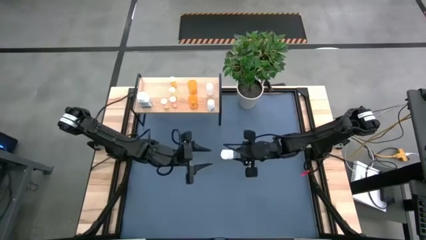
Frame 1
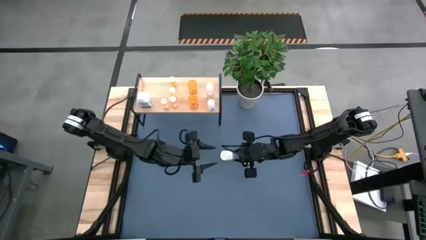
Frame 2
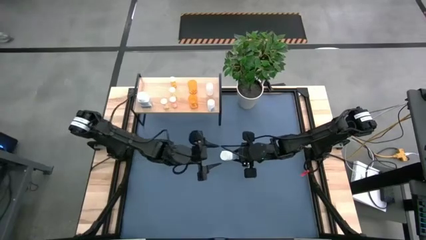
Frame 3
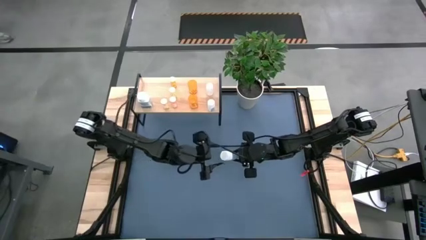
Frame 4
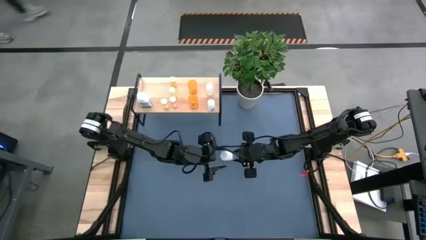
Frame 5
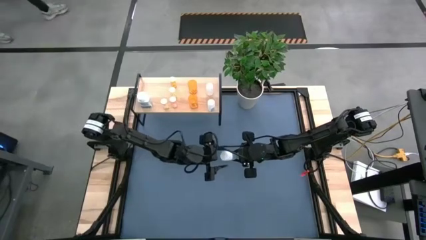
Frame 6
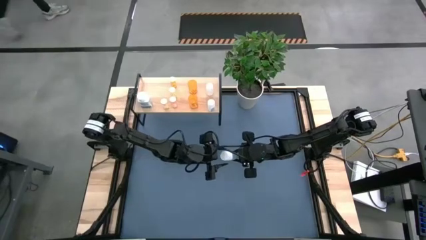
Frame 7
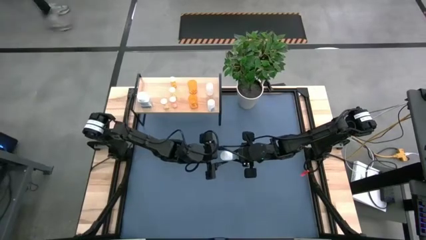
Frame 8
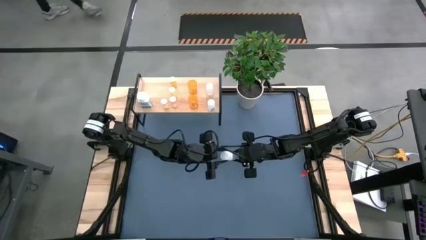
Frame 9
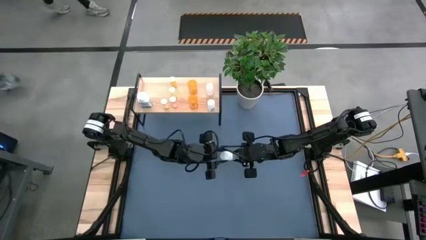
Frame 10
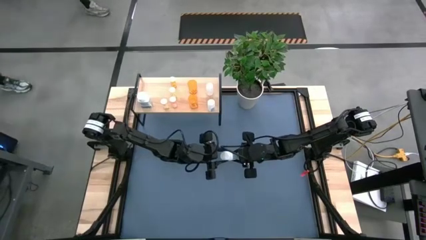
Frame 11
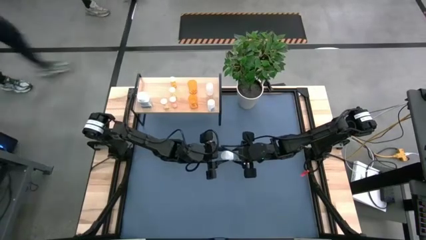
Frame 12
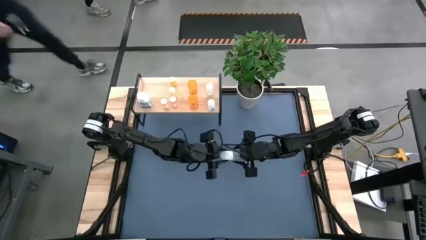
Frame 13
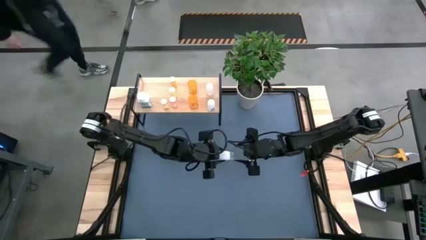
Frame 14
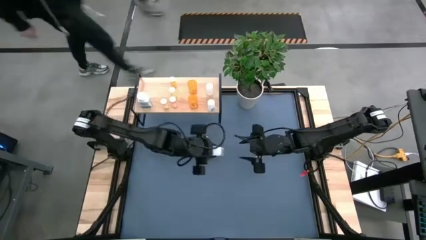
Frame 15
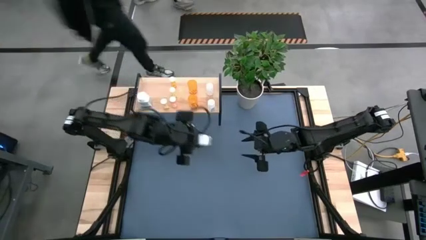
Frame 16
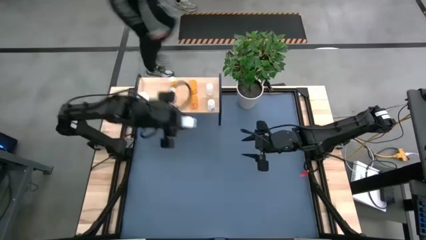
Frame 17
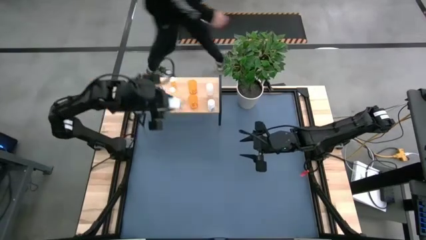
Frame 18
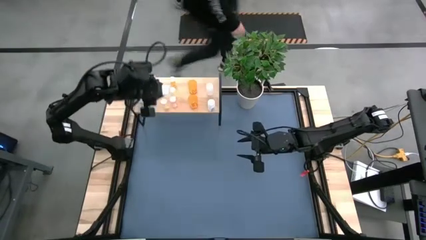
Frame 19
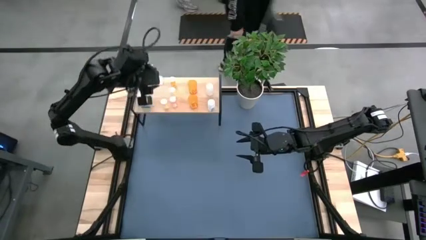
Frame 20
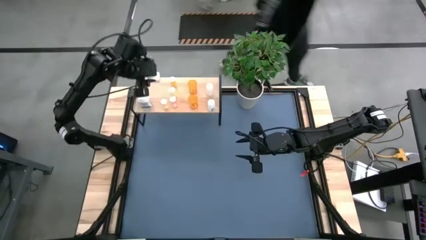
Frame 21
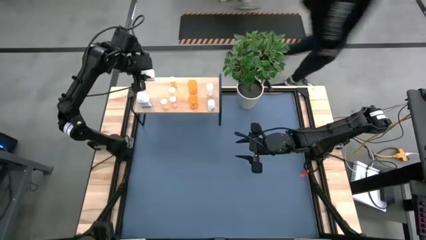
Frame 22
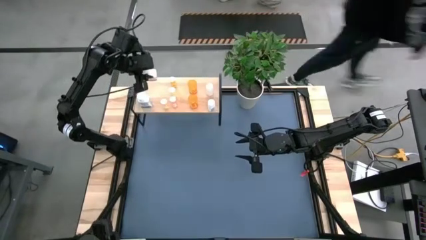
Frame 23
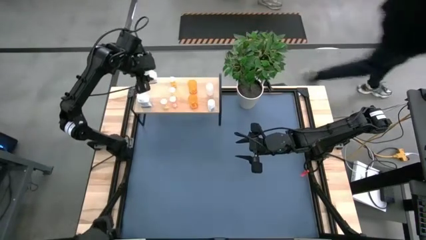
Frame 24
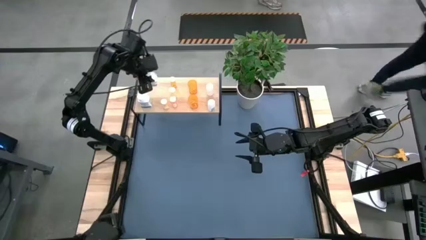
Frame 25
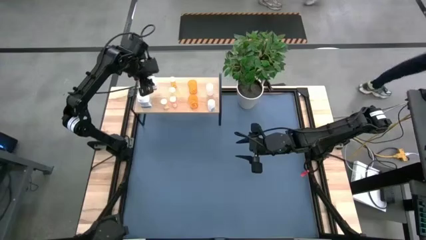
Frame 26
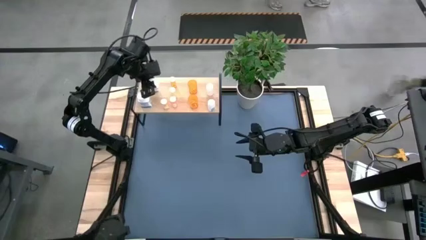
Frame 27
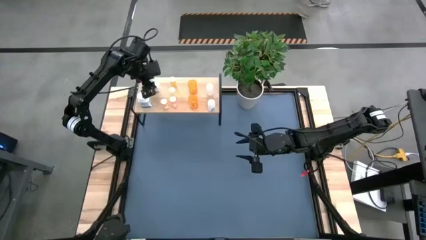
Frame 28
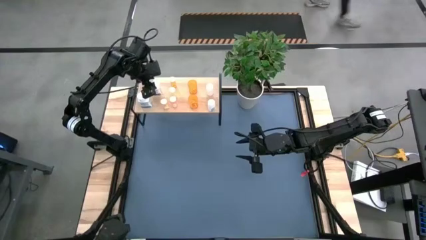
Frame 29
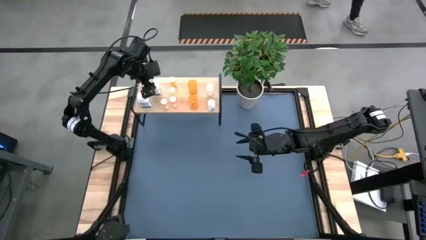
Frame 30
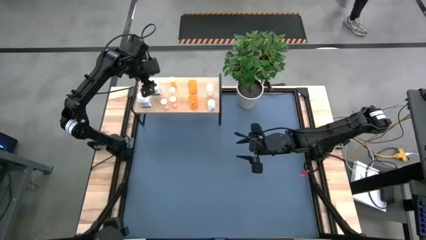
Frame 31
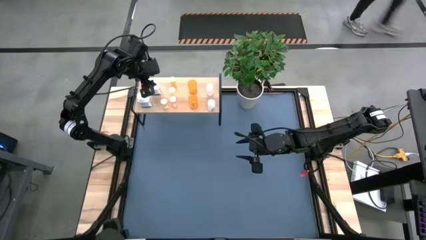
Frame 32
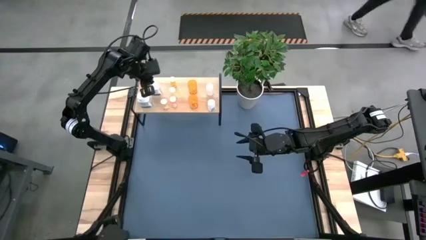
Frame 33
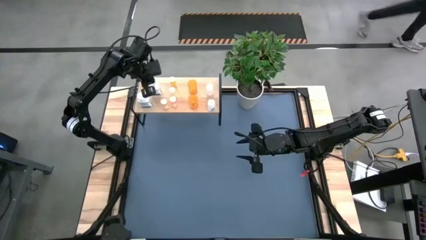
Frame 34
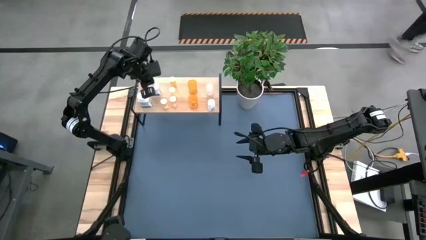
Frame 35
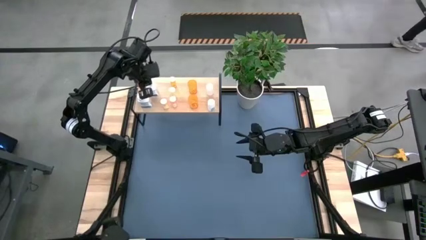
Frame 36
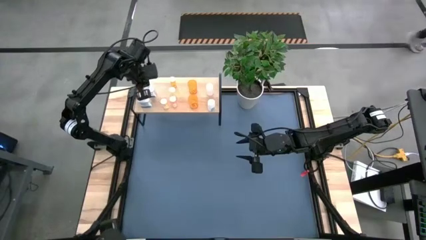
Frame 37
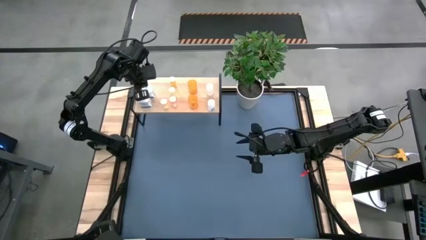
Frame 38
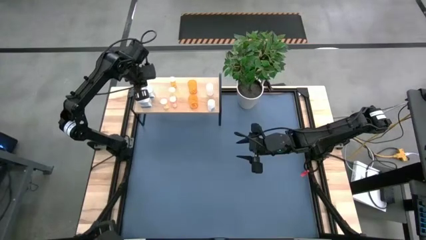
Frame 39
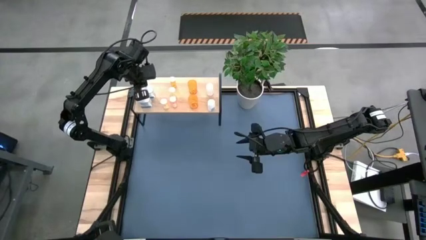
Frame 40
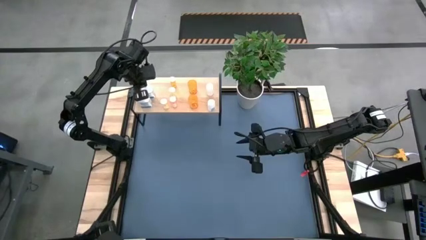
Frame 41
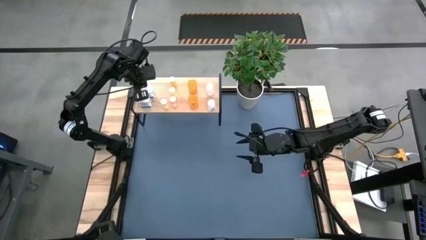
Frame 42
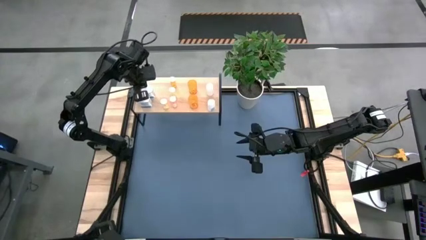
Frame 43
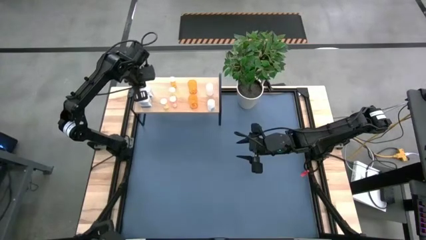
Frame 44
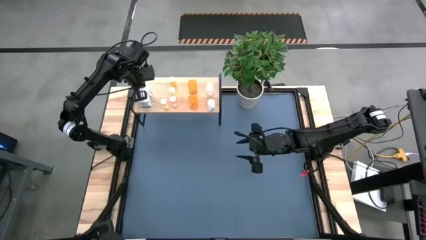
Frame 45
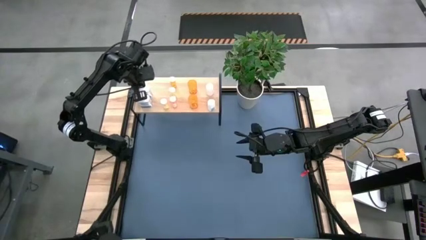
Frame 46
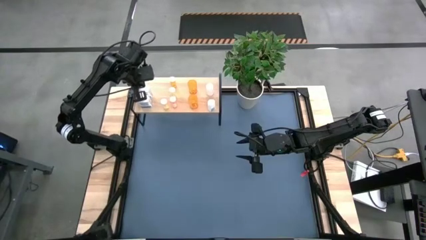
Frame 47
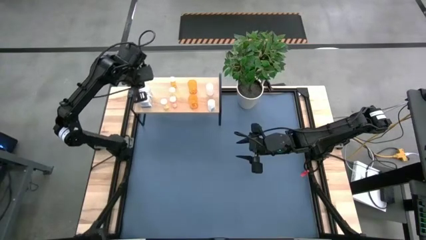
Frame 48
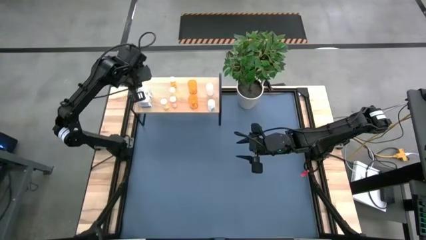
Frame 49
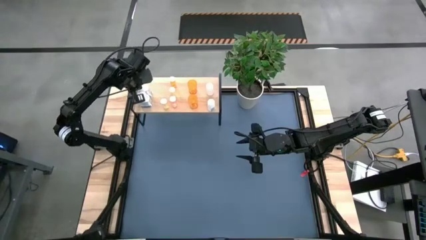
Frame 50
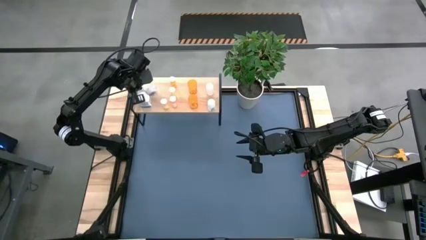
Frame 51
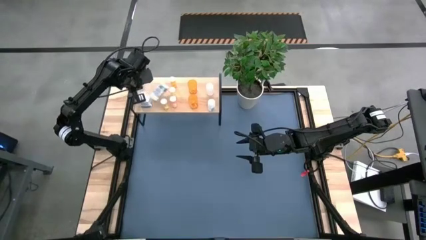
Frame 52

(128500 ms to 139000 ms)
Task: Pick and place medicine bottles onto shelf by color
Put the white pill bottle on the shelf

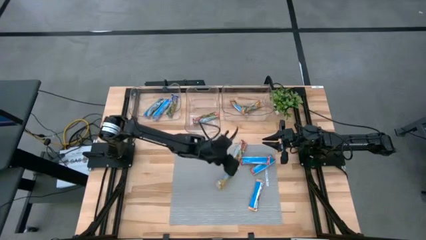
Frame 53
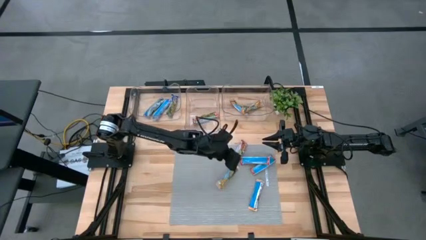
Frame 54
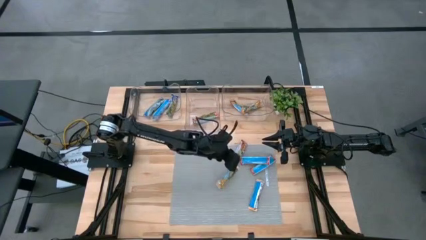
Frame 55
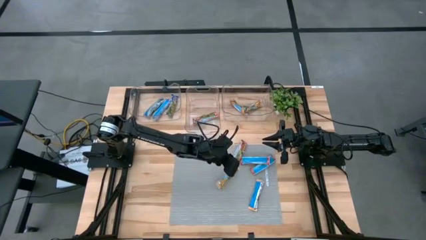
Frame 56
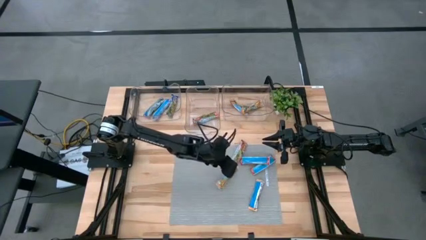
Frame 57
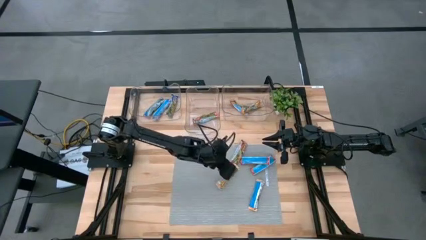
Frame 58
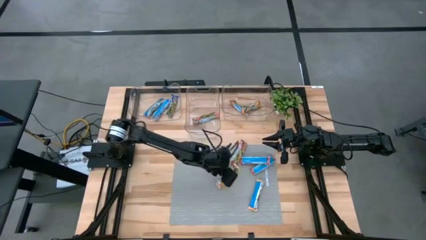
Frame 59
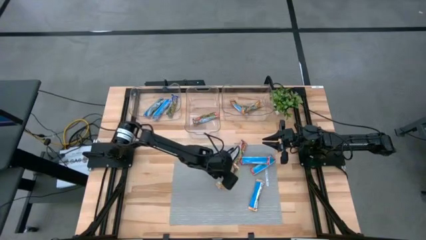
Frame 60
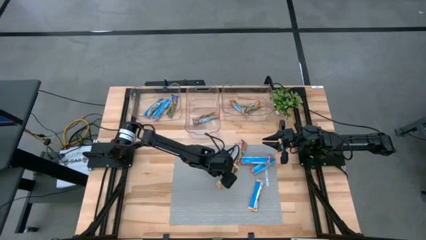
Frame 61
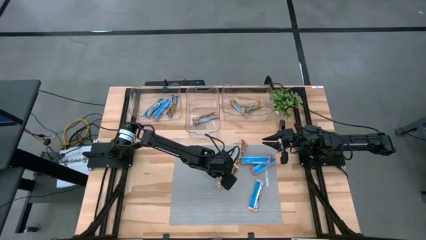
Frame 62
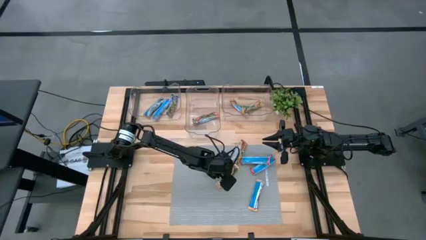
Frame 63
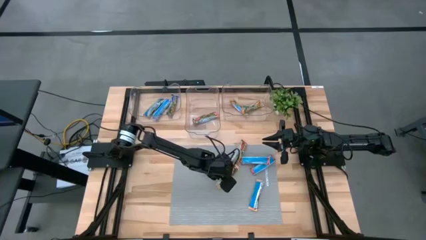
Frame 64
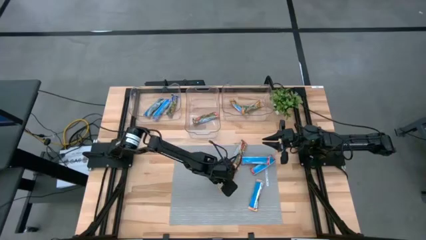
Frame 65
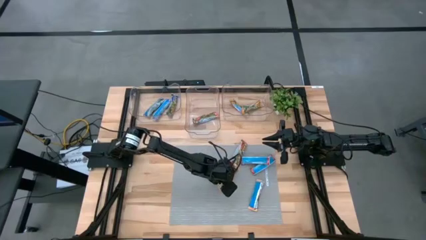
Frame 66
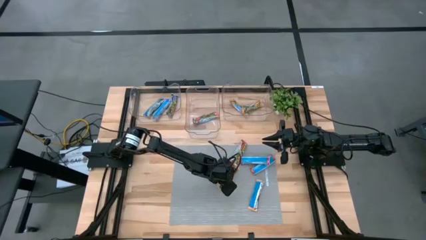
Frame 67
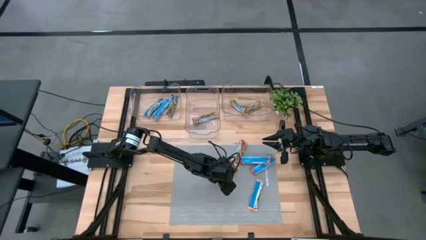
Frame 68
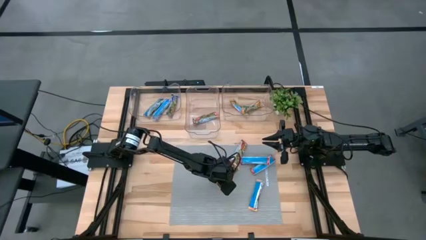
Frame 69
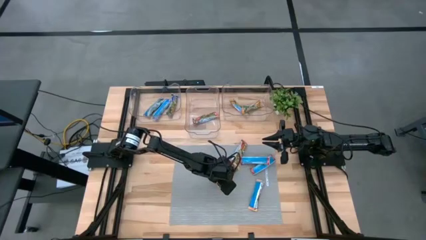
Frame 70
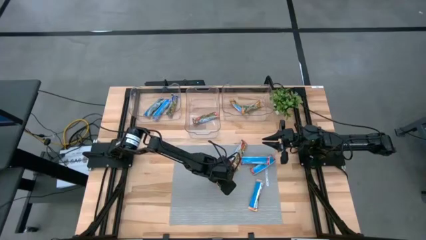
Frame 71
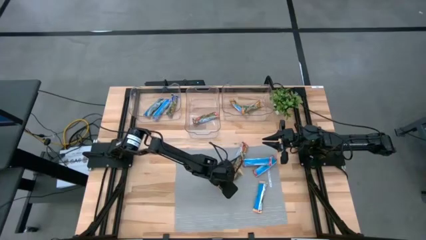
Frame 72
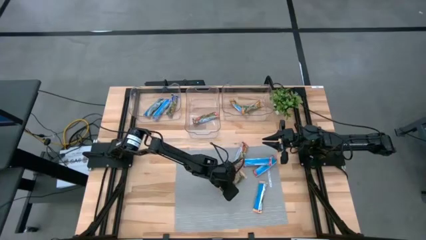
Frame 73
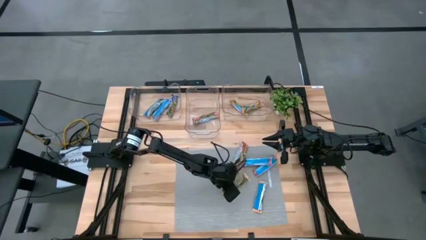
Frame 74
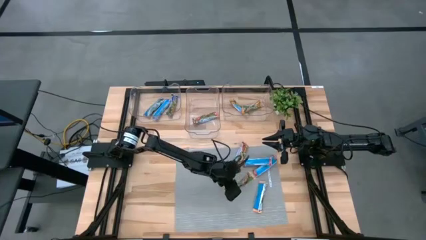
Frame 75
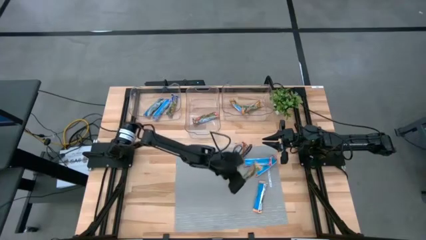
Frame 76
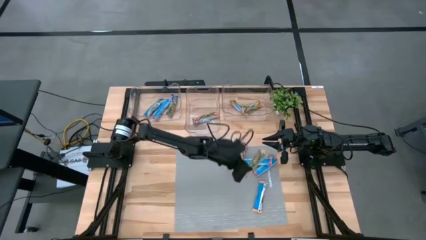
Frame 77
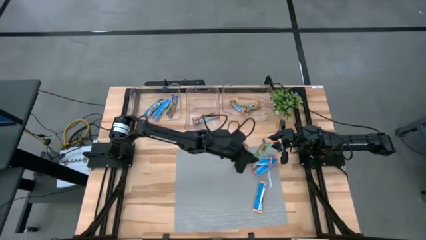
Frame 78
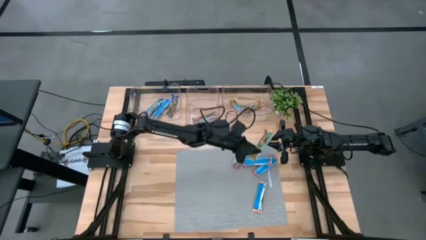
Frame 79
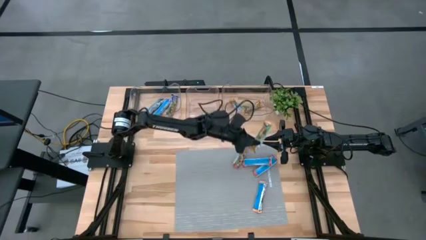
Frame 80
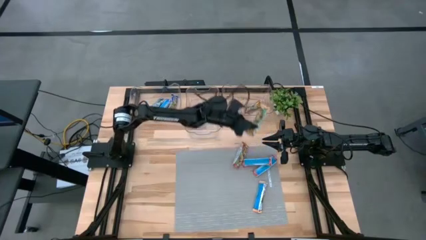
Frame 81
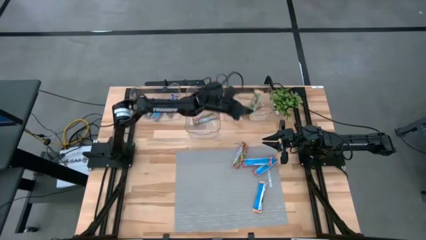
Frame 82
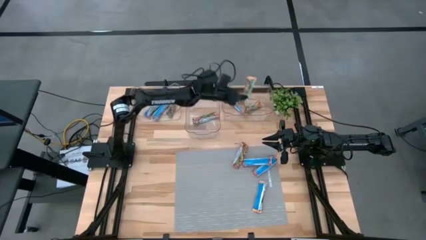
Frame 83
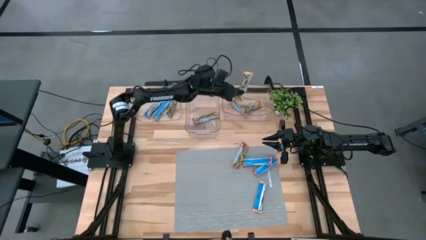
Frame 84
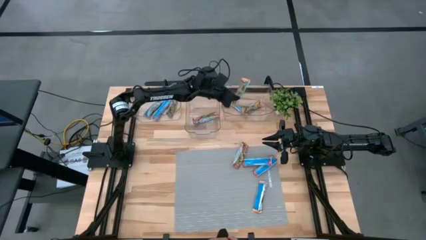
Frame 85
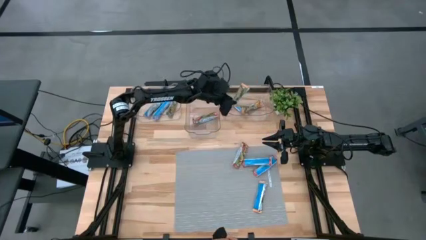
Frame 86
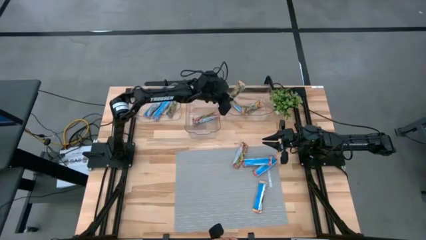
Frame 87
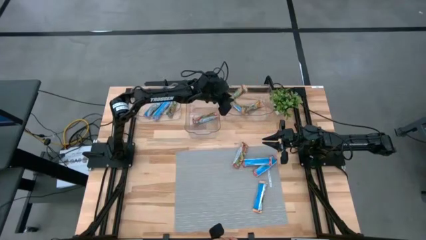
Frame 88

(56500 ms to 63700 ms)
Task: Pick and place Granola Bars by type
Put the yellow granola bar into the right transparent bin
